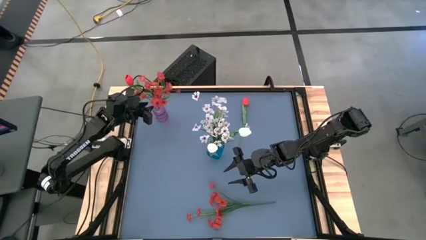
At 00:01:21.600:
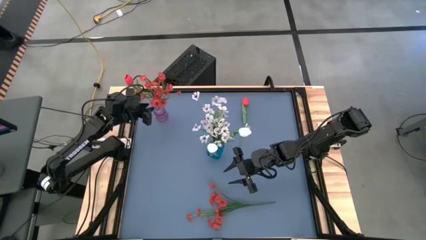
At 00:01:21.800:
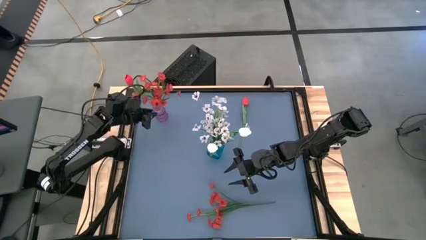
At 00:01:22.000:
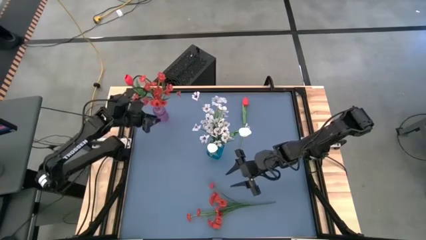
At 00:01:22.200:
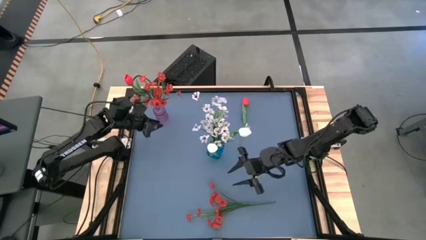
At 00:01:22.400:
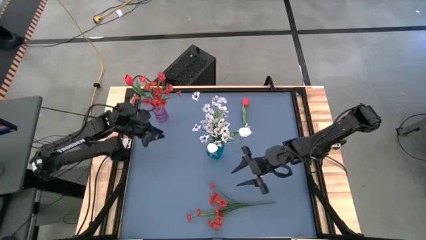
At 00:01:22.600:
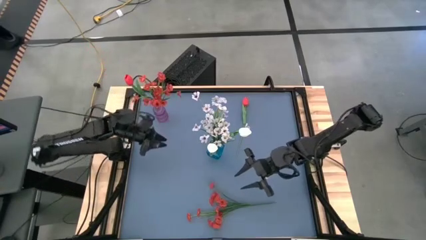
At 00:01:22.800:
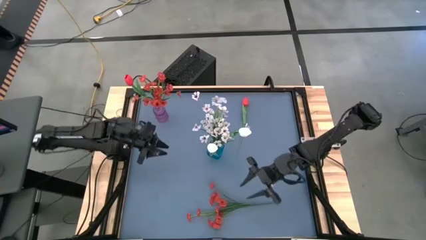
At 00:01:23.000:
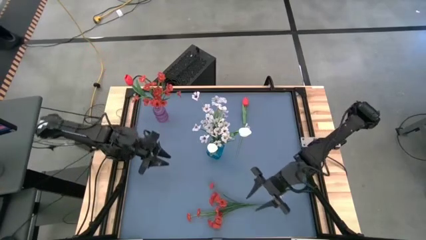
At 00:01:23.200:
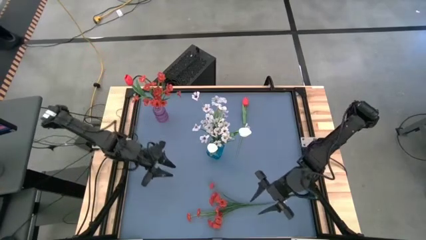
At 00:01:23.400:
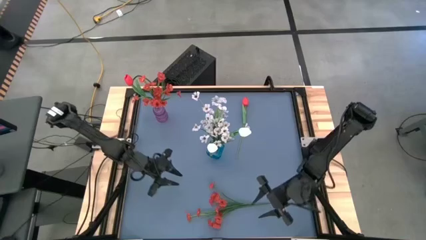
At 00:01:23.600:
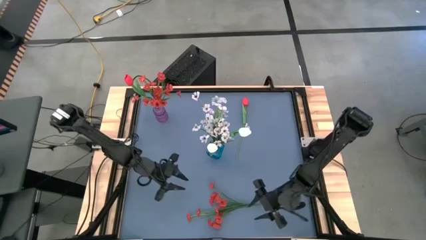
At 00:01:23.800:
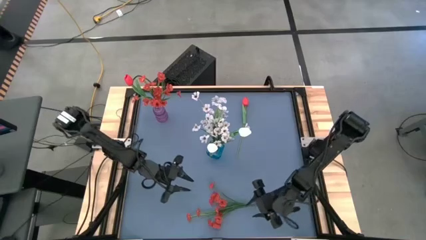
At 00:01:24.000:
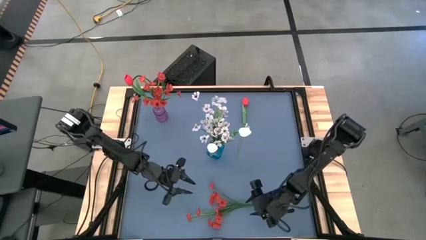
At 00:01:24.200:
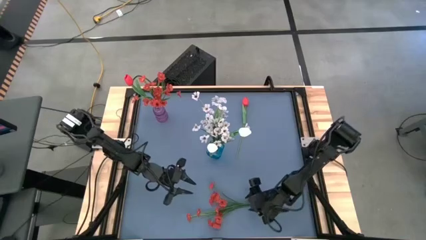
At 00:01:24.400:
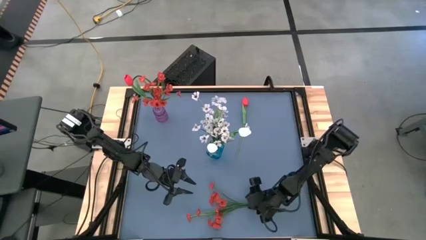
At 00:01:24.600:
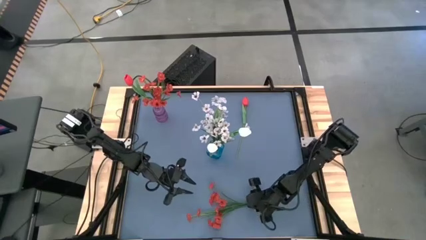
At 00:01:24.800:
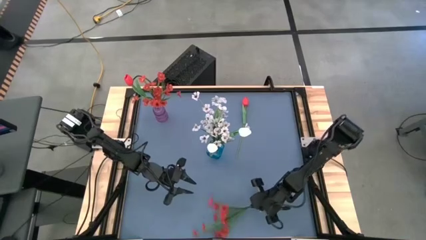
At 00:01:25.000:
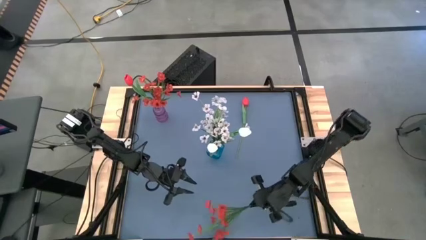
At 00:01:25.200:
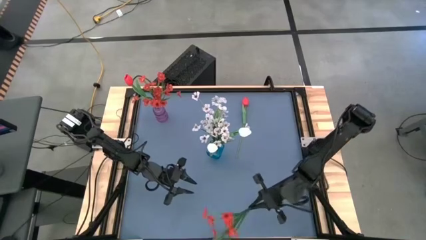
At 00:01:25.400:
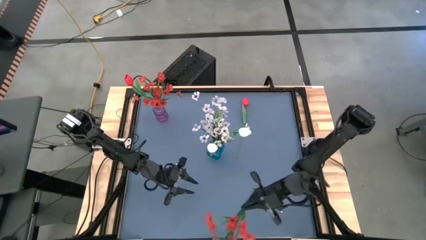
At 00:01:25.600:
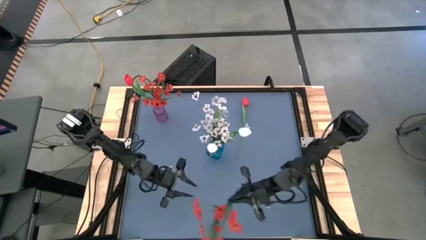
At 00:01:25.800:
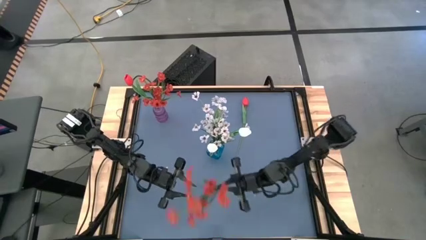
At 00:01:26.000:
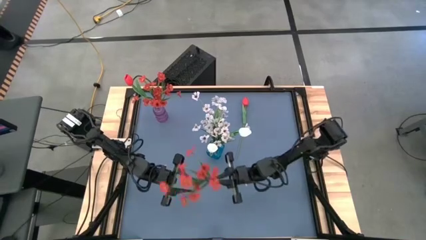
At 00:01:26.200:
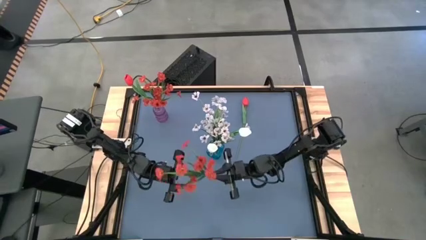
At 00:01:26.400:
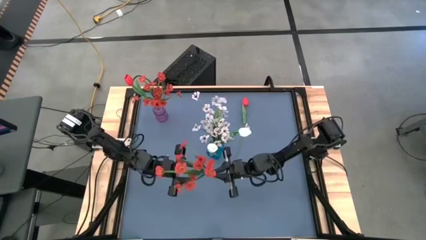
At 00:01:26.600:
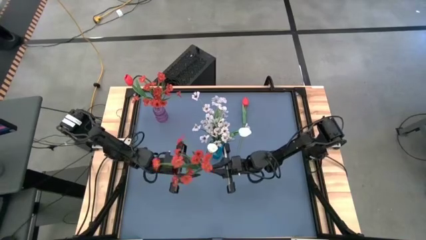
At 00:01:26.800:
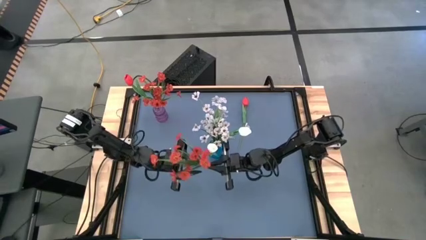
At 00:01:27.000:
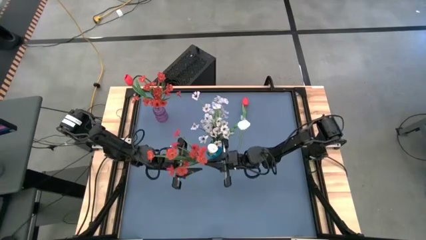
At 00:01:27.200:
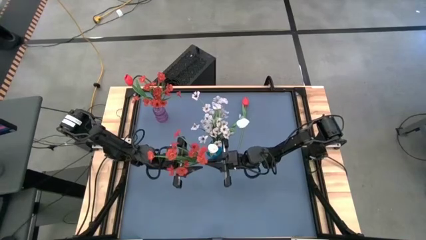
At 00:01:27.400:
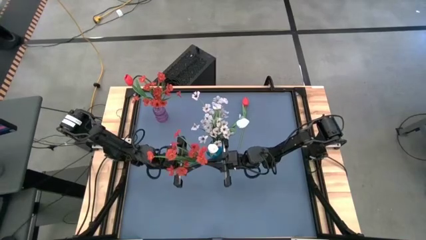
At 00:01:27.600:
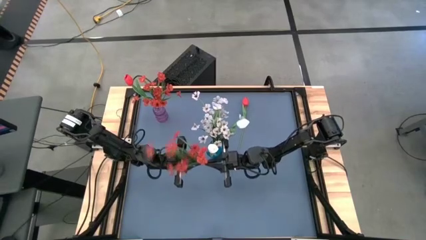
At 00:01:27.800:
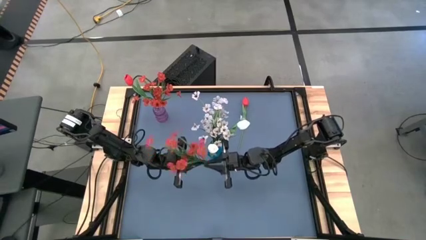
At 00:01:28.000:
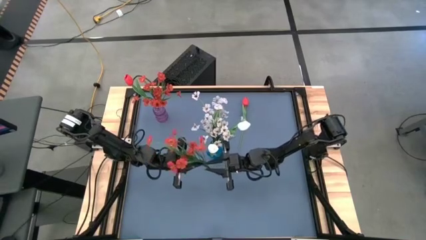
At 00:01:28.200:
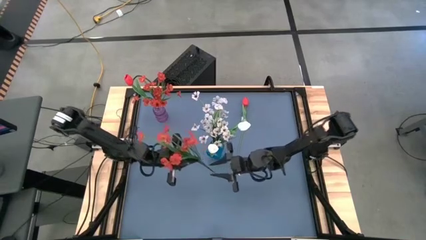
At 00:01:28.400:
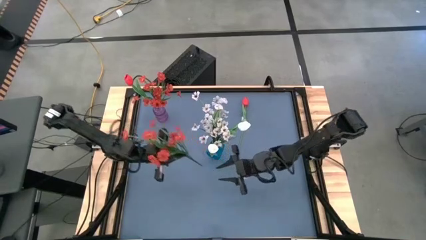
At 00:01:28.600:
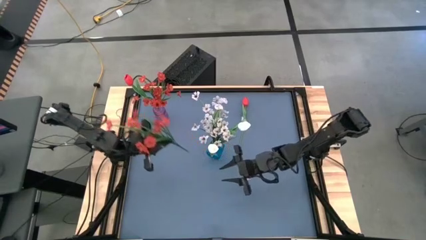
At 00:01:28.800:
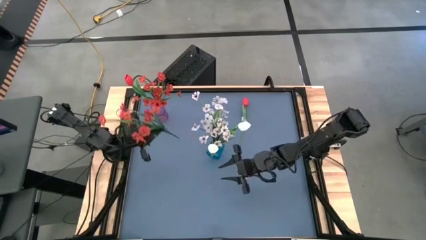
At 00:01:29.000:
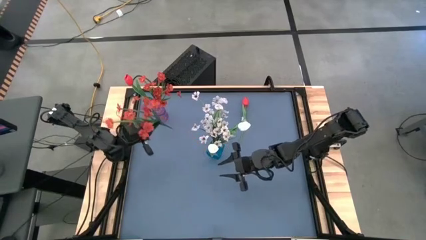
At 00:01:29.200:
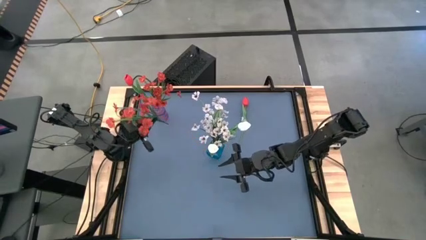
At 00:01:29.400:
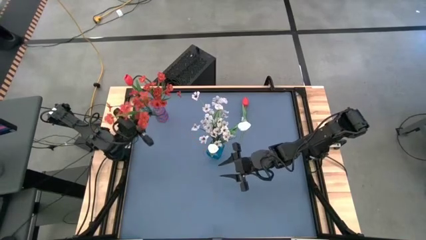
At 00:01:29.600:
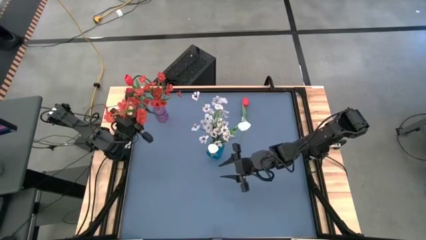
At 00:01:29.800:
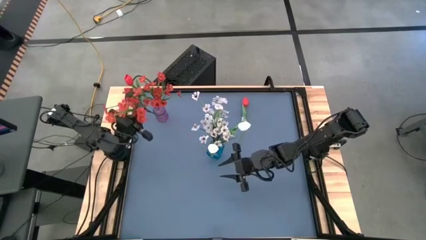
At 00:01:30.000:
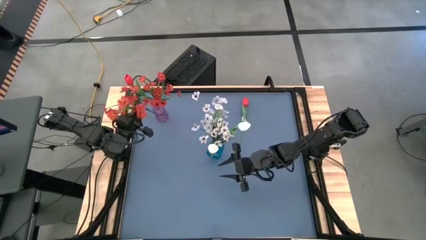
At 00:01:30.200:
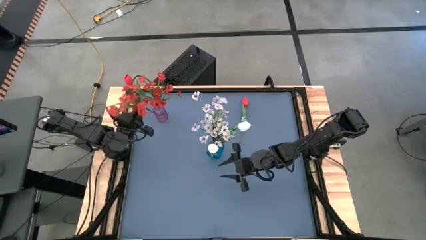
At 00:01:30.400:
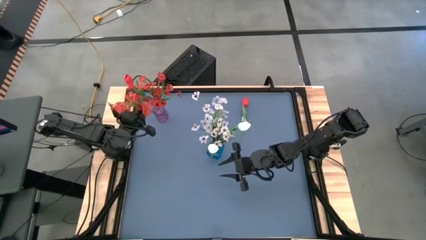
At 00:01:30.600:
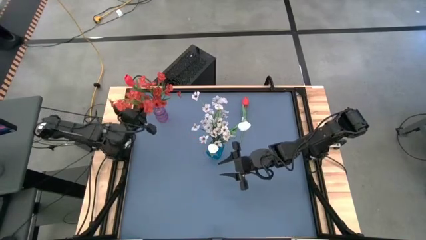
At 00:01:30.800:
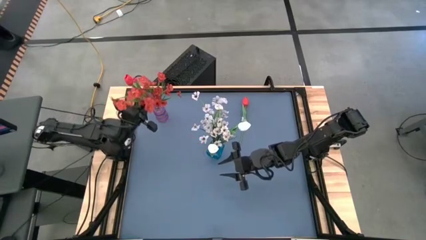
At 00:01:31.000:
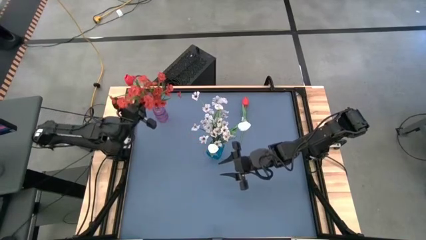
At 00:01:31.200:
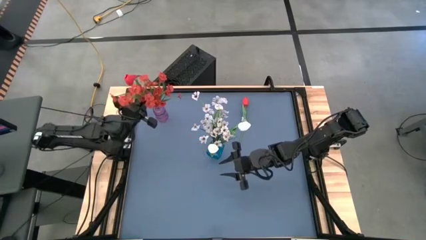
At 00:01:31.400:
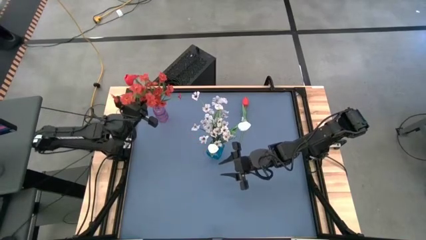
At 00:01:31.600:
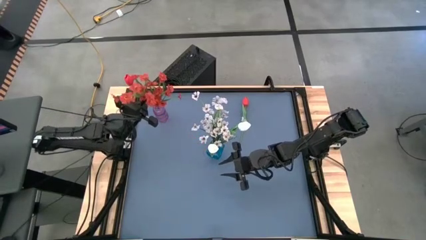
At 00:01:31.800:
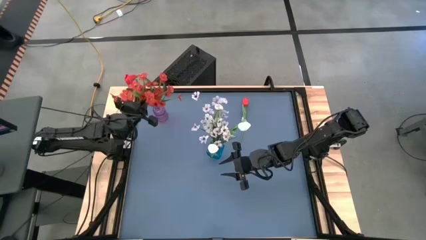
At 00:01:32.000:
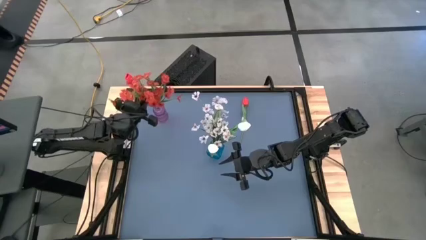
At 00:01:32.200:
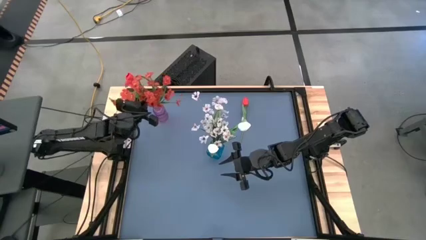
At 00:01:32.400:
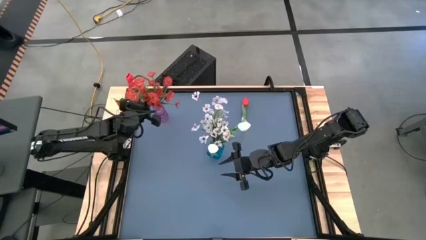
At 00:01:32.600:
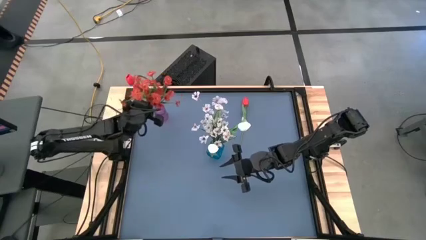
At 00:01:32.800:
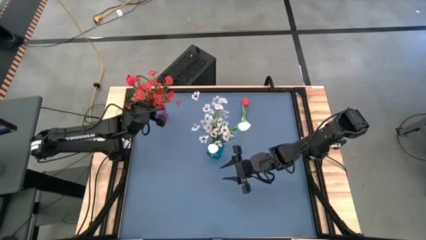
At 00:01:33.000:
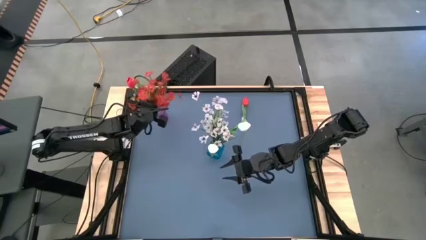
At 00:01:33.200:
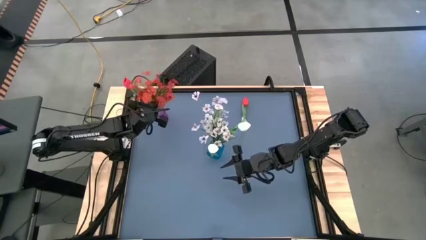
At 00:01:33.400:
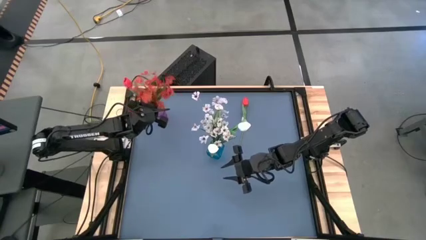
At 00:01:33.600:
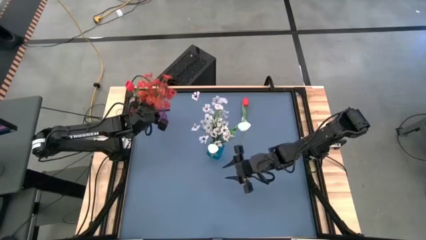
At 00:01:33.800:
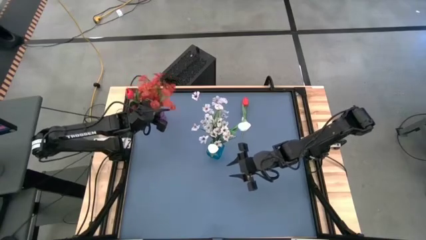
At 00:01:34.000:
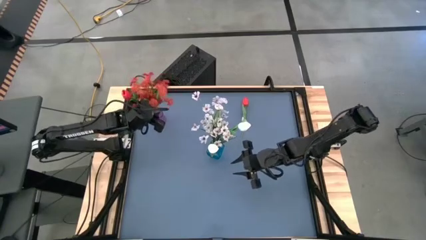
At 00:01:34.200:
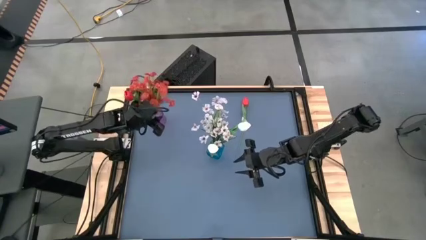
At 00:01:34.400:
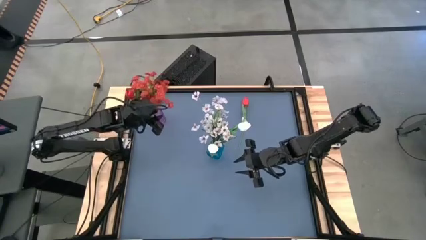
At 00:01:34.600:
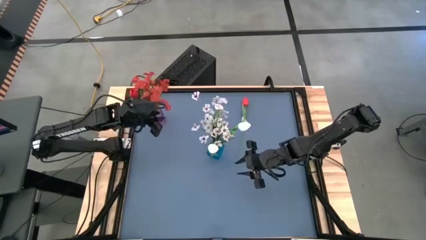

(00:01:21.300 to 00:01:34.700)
Task: Sort flowers into vase by color
Put the red flowers into the purple vase
